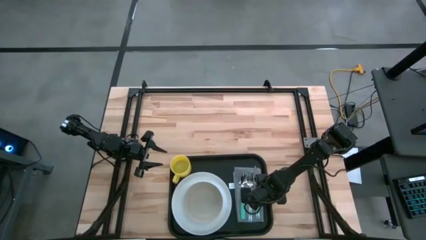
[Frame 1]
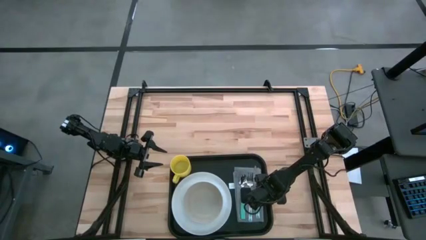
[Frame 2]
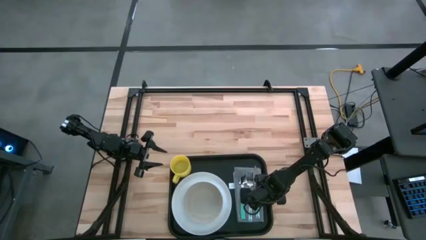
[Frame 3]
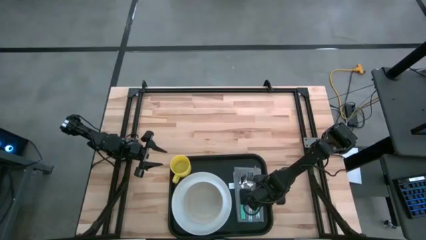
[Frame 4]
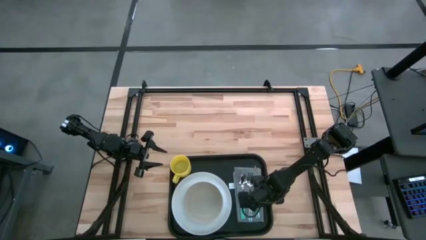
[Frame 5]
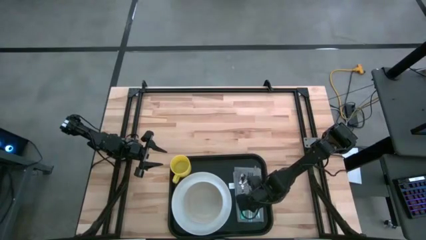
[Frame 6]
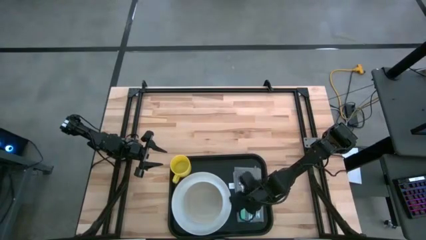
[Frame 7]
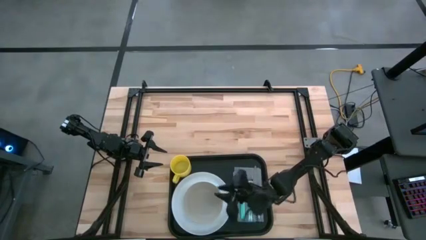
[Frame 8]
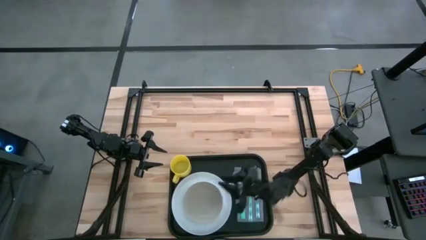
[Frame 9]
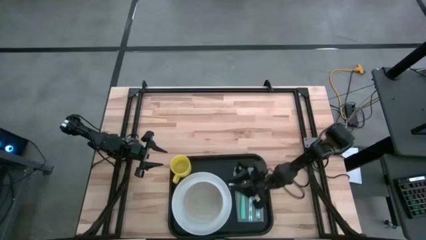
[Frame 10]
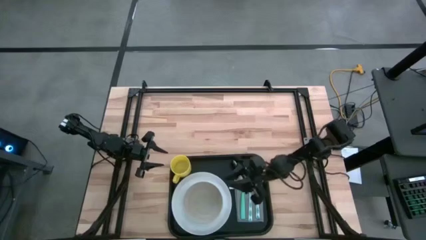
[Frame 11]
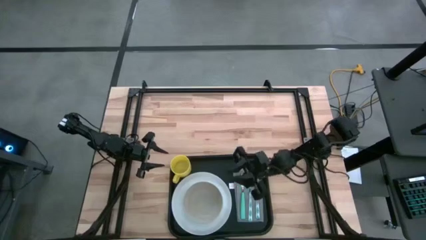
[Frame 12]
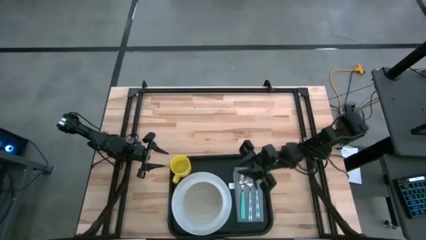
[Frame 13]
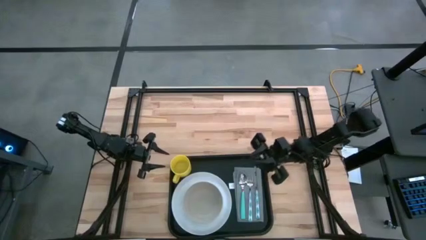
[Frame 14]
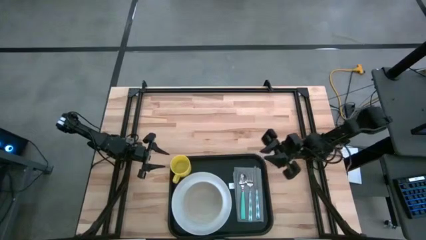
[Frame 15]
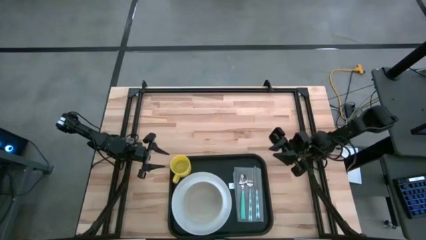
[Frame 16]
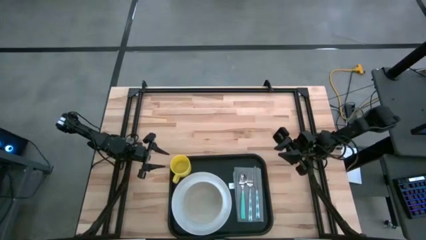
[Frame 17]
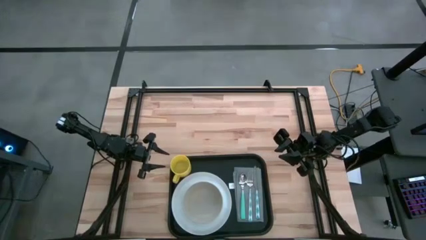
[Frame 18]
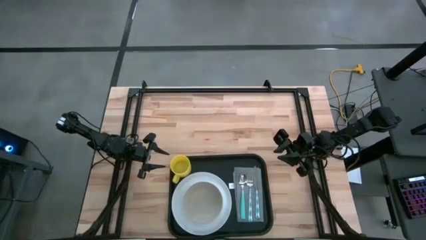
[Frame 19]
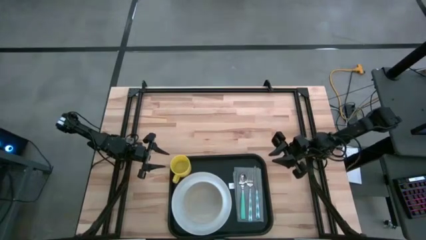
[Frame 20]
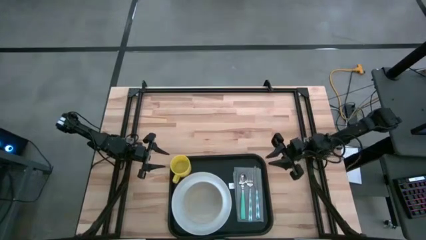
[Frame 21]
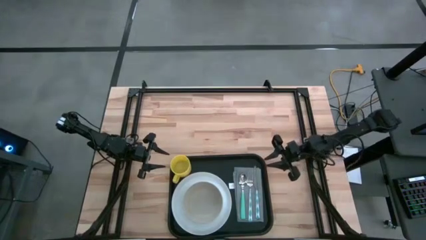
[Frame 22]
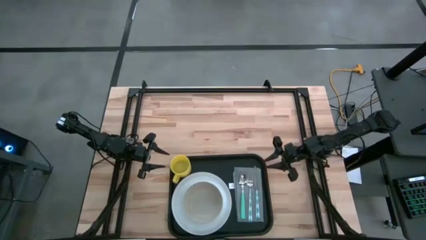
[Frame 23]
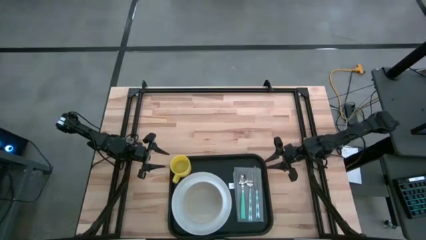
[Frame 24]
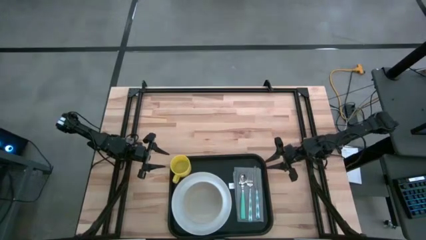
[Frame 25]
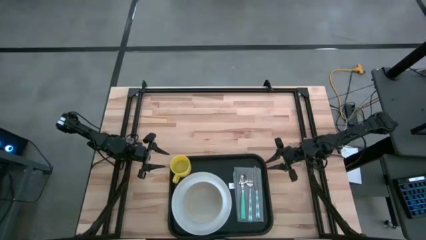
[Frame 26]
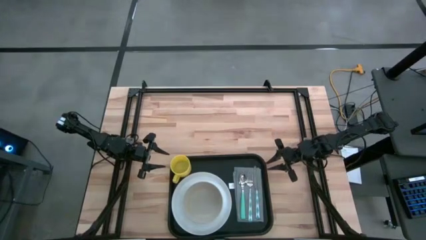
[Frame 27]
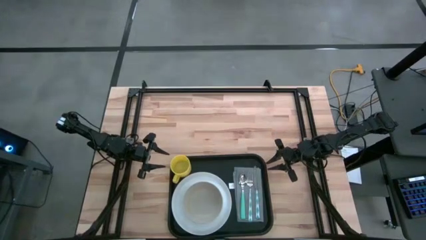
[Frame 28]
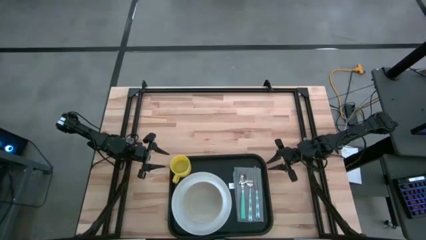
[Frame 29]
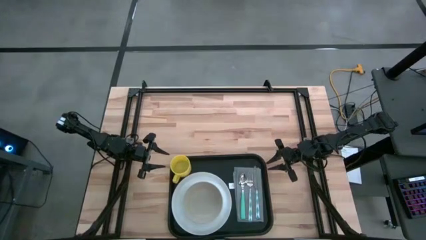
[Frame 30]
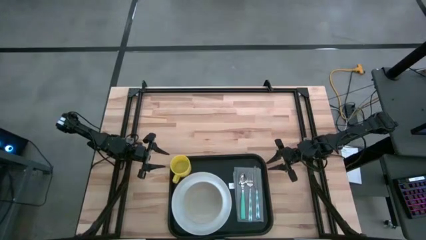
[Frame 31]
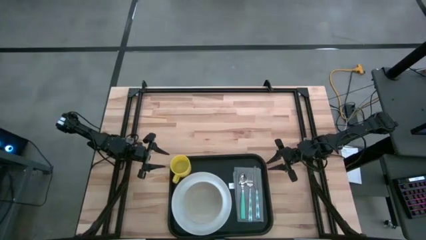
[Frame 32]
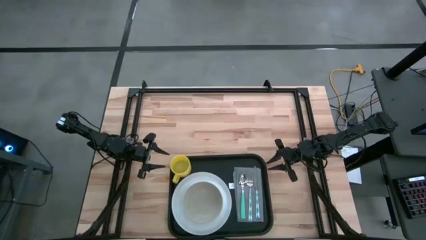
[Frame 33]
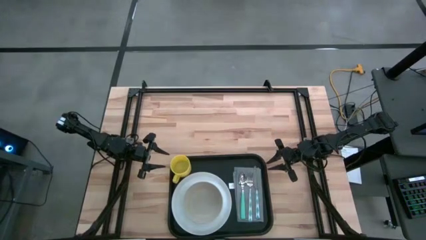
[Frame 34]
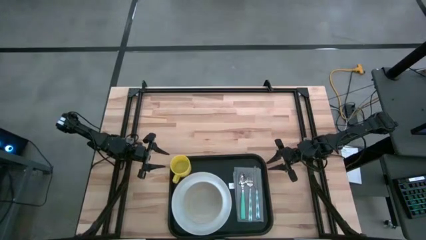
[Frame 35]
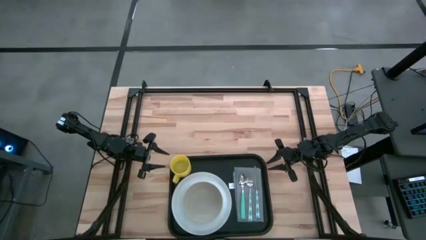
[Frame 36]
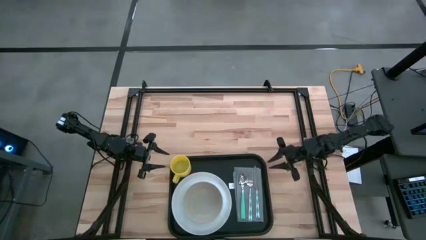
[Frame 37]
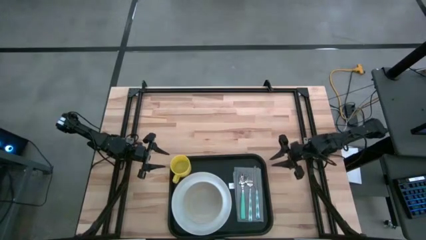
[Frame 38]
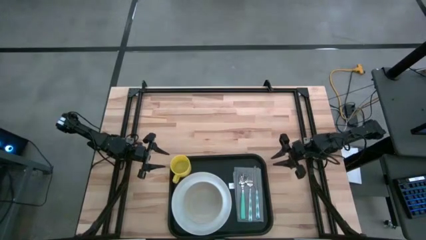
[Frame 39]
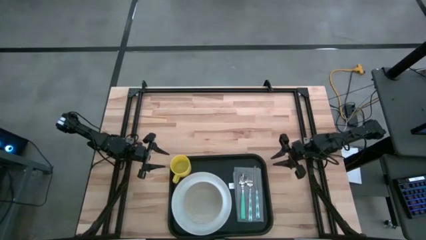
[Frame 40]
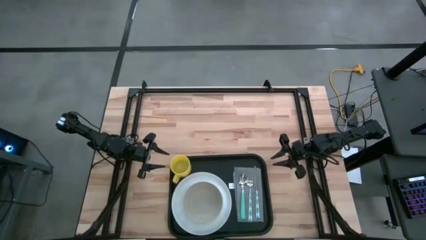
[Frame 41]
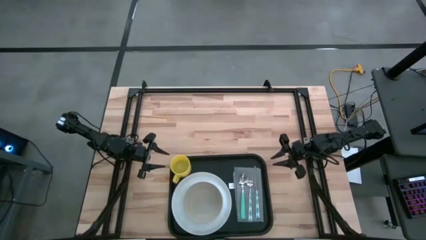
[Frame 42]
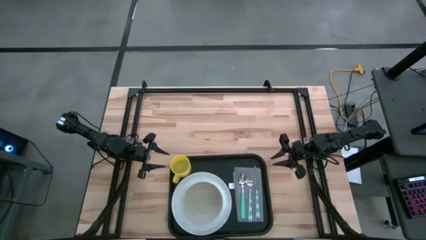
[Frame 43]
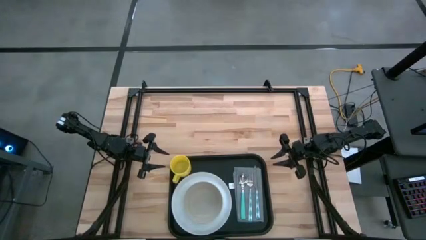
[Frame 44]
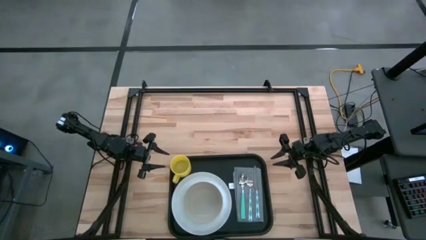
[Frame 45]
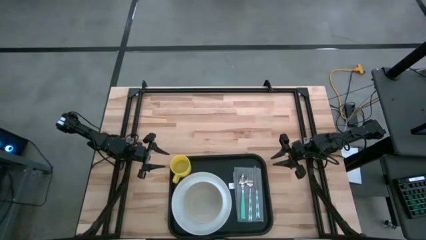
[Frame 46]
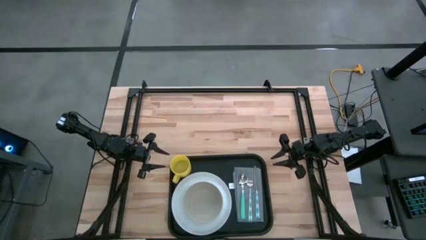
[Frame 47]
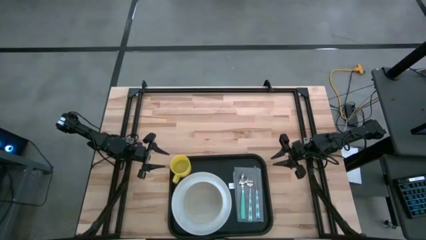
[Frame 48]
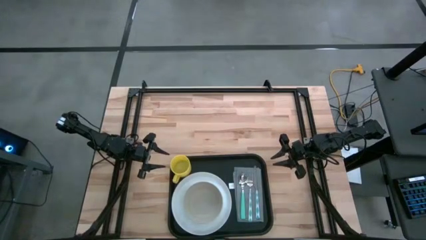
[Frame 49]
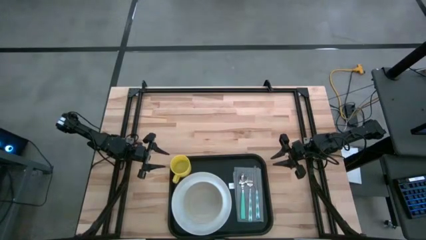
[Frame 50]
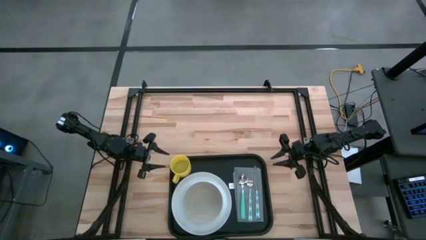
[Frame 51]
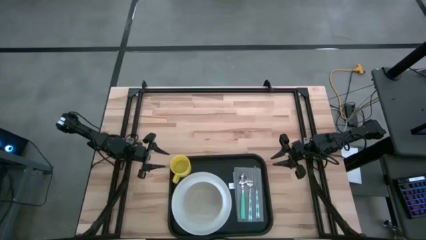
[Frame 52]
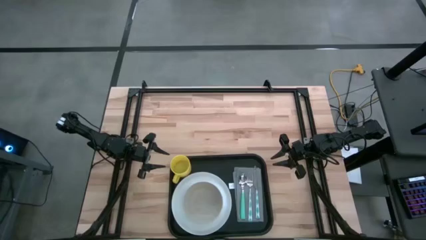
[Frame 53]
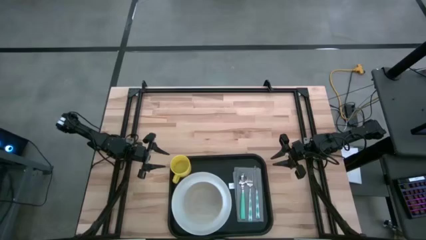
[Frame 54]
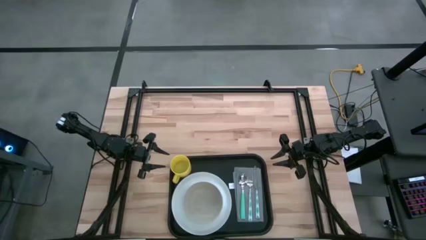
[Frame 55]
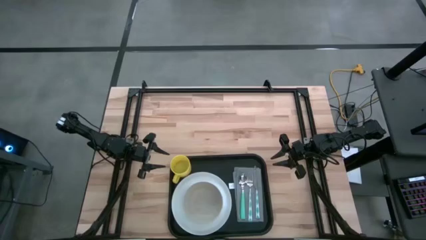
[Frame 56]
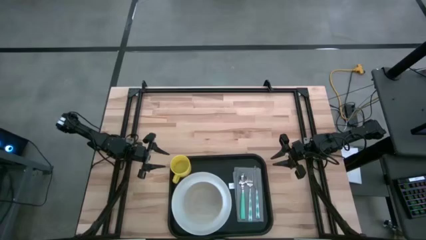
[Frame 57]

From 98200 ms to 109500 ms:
Task: Set up tray
Return to Home Position

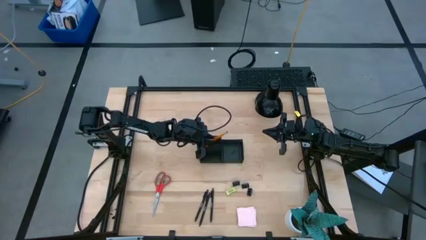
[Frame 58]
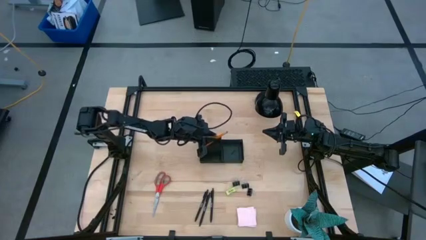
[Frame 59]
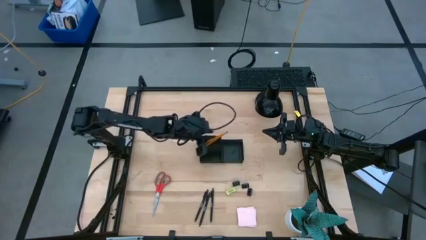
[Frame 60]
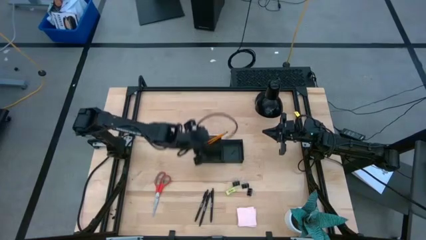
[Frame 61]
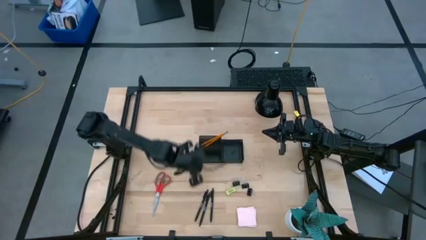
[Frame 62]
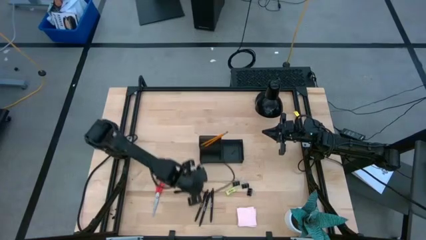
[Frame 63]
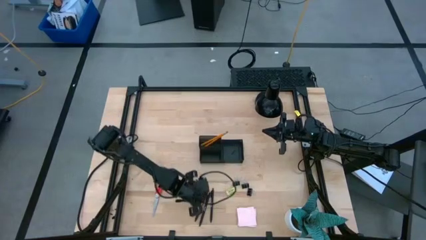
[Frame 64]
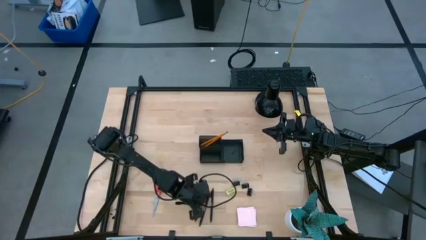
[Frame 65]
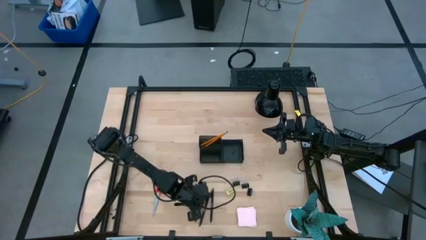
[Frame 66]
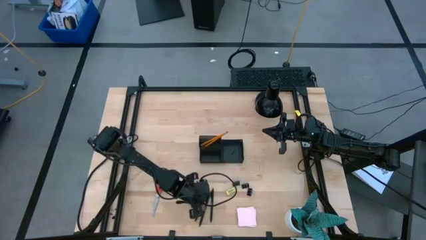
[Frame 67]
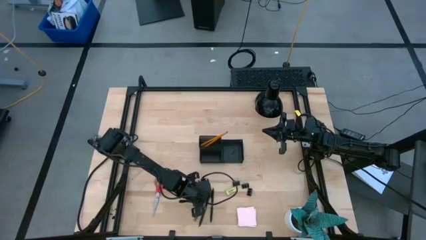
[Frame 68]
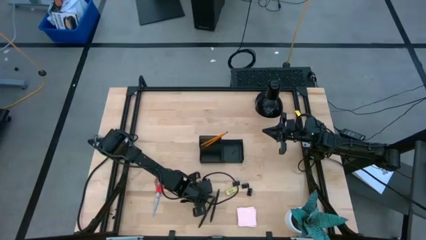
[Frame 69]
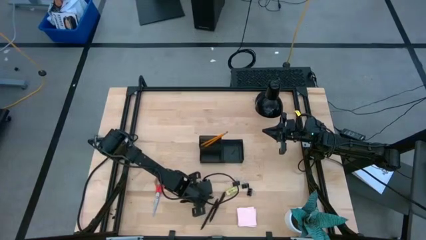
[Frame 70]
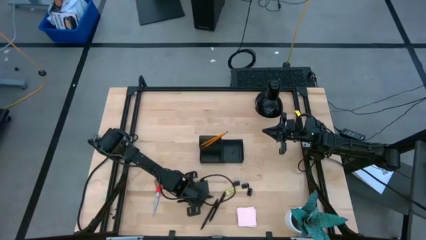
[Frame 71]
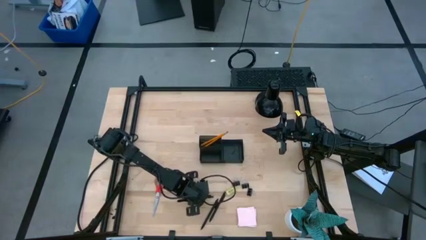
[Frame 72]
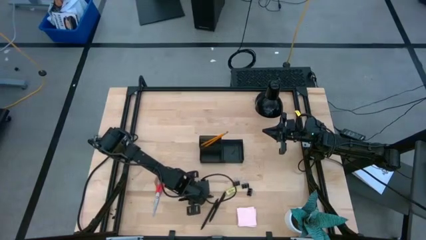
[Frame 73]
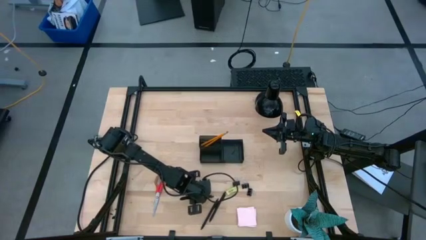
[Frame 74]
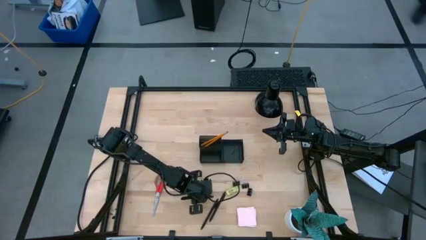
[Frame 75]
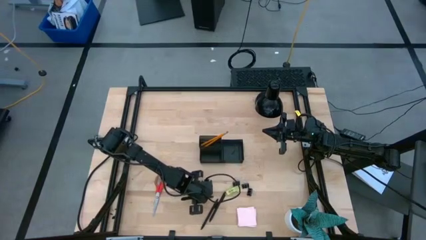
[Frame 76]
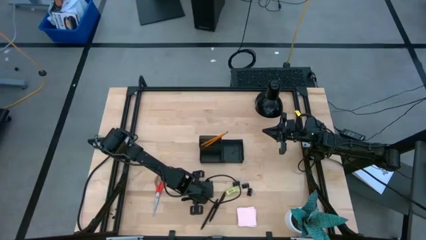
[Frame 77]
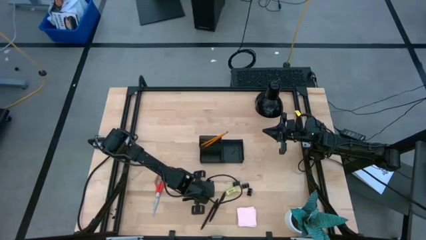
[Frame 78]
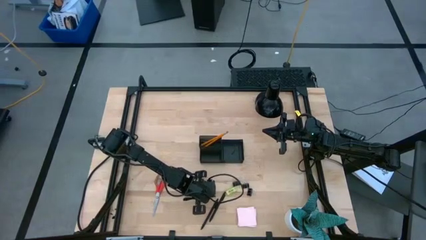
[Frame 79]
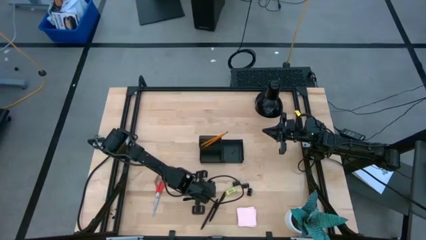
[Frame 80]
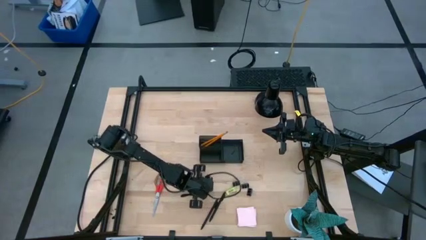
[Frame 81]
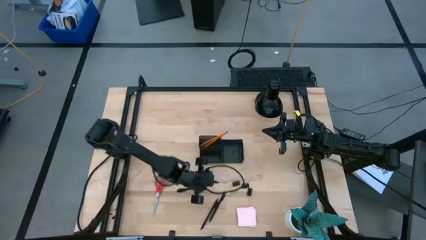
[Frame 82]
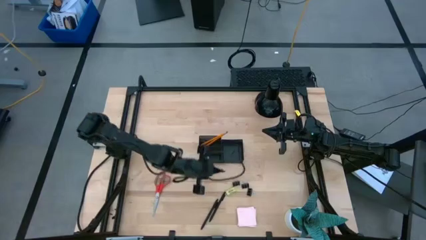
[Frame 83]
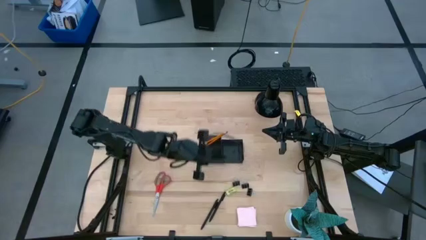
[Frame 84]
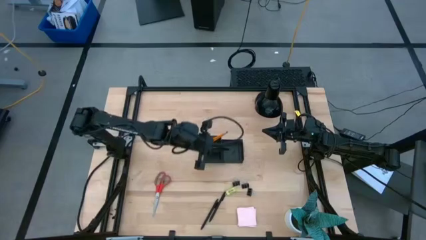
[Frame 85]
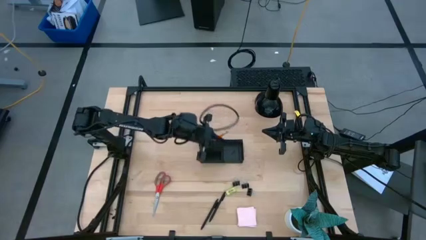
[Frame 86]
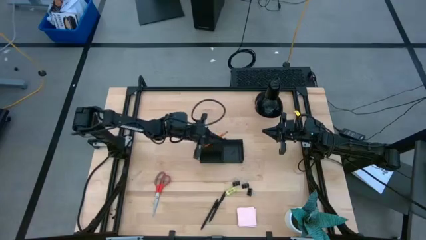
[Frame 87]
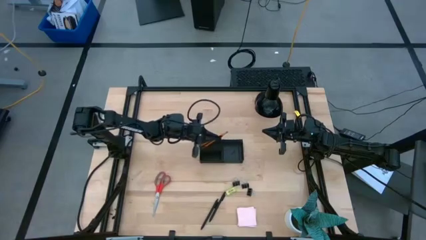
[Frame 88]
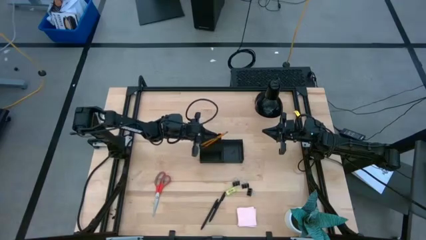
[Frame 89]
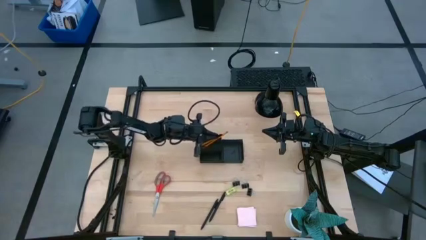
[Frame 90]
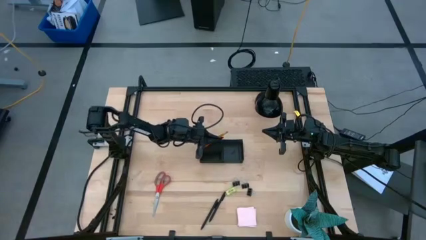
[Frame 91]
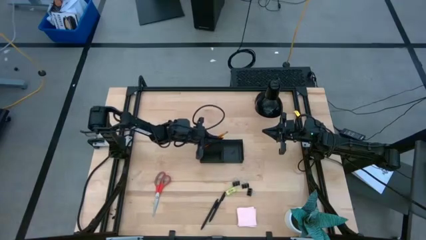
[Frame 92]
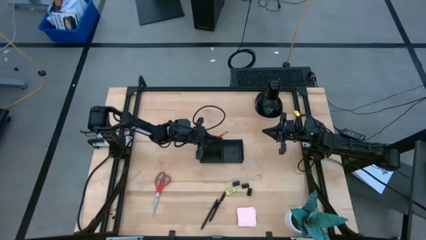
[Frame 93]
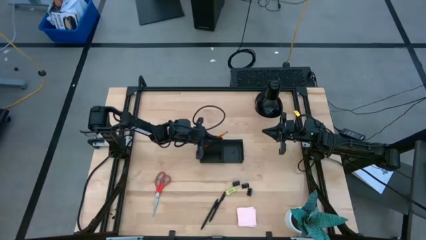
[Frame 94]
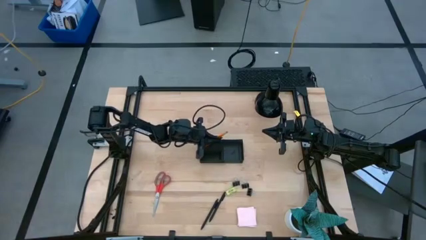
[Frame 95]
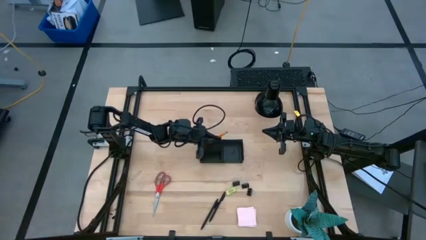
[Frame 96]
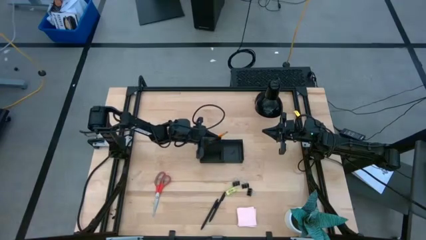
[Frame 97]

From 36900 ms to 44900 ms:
Task: Pick and place office supplies into organizer
Put the black pen into the black desk organizer
